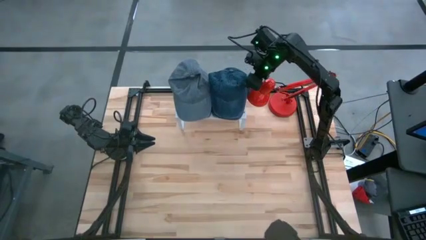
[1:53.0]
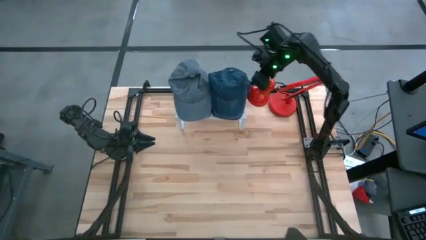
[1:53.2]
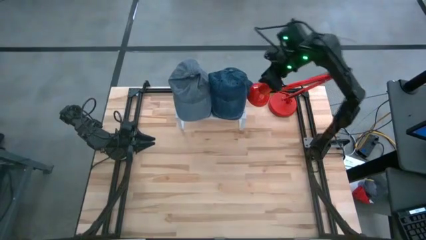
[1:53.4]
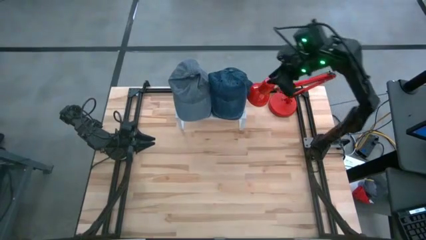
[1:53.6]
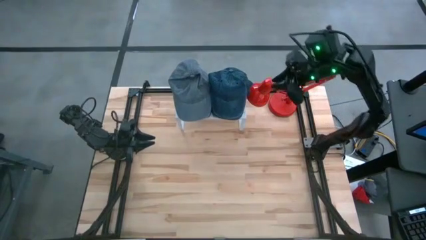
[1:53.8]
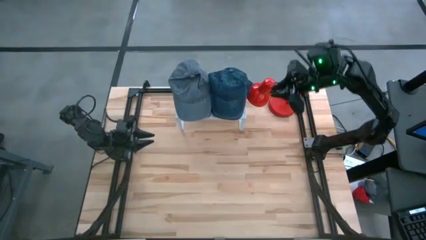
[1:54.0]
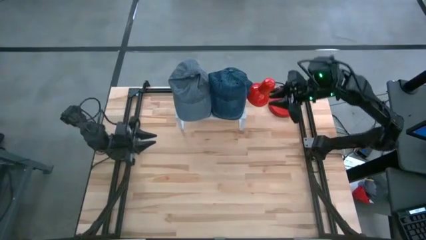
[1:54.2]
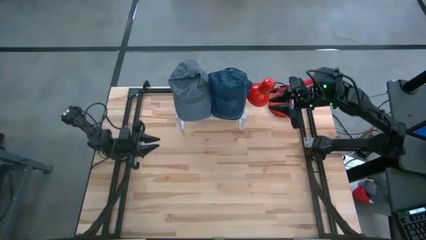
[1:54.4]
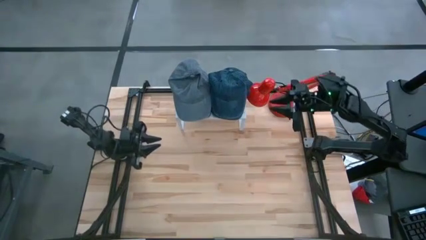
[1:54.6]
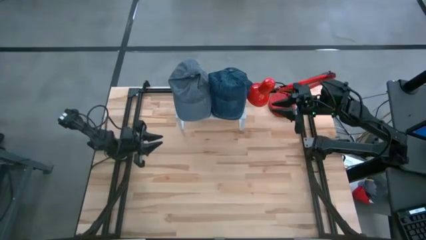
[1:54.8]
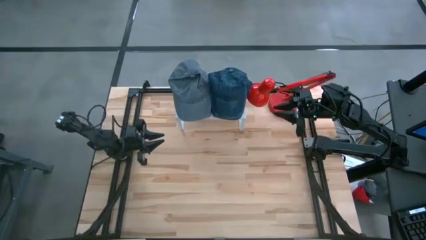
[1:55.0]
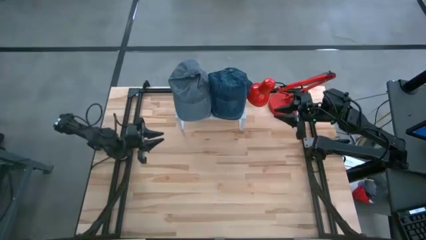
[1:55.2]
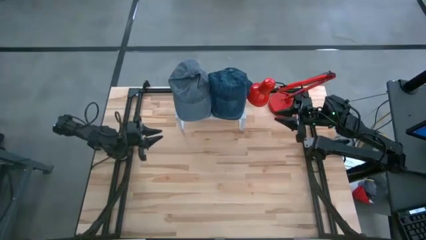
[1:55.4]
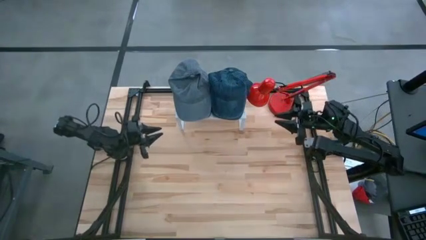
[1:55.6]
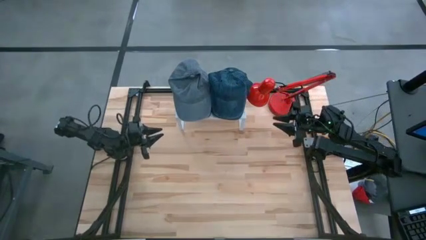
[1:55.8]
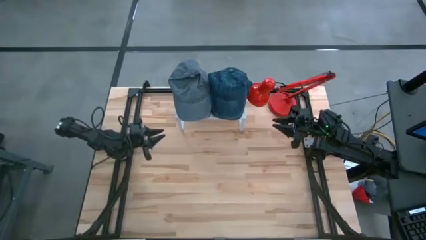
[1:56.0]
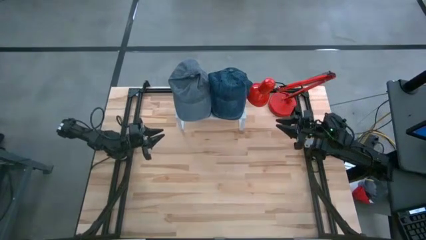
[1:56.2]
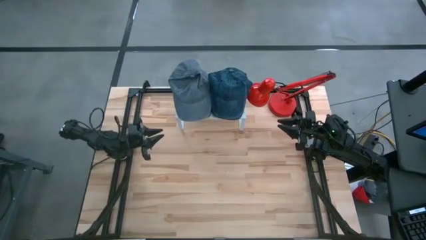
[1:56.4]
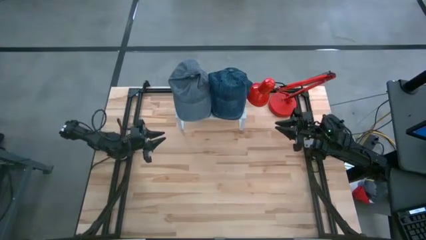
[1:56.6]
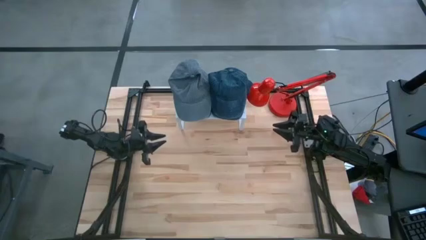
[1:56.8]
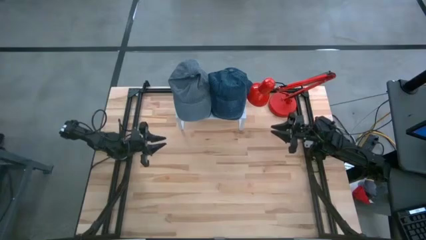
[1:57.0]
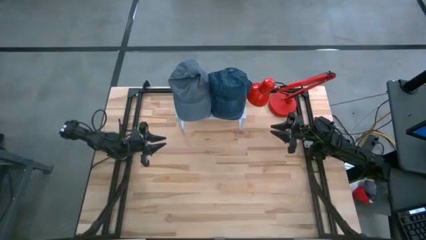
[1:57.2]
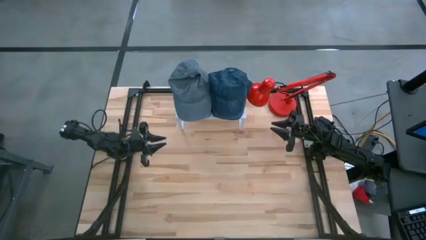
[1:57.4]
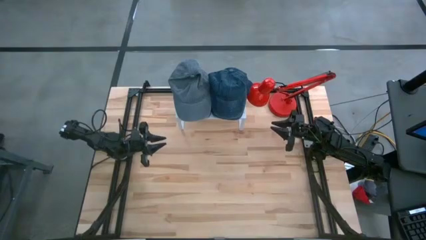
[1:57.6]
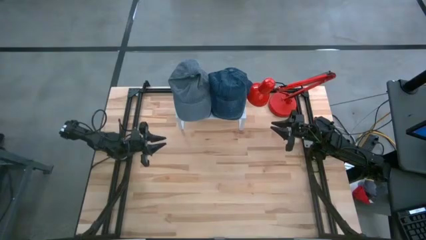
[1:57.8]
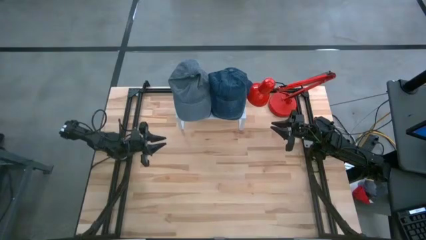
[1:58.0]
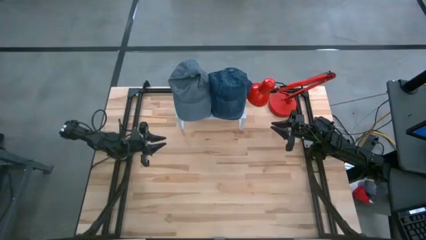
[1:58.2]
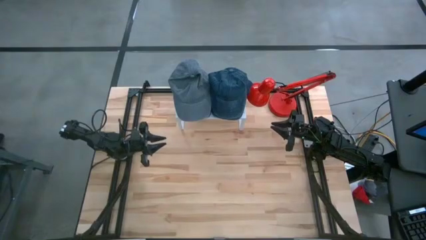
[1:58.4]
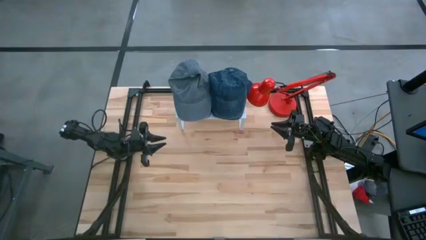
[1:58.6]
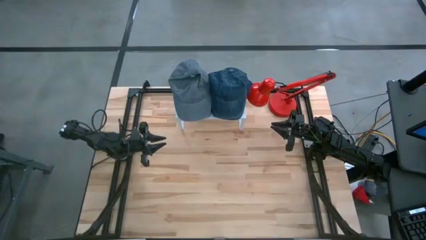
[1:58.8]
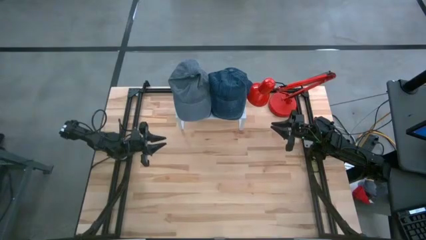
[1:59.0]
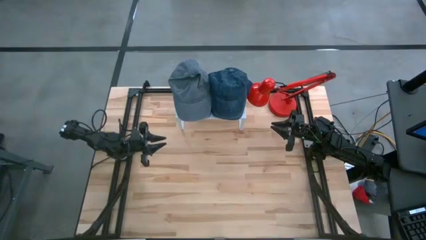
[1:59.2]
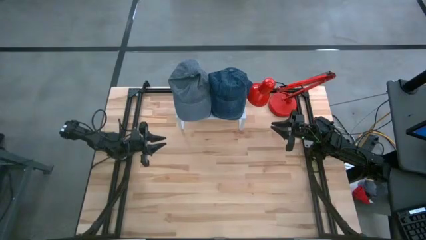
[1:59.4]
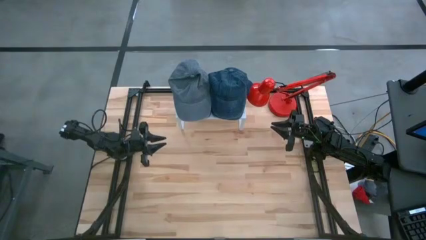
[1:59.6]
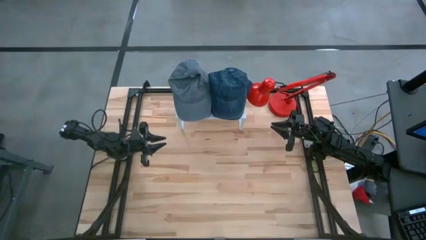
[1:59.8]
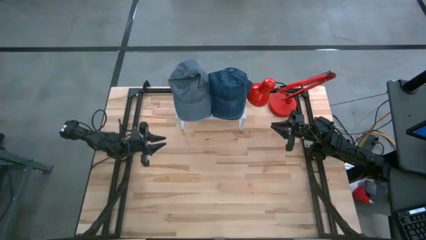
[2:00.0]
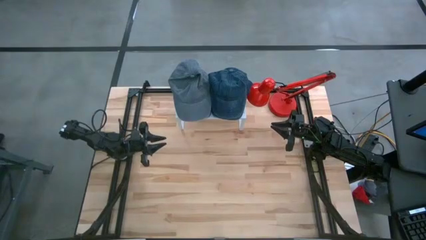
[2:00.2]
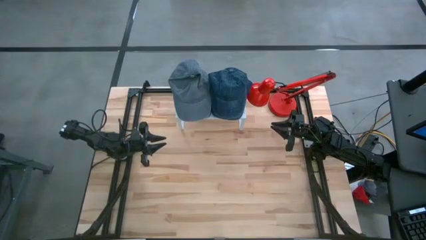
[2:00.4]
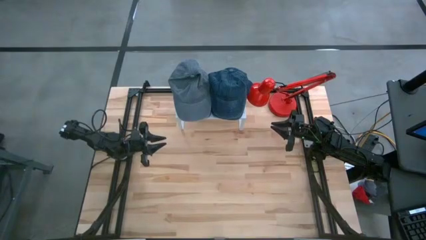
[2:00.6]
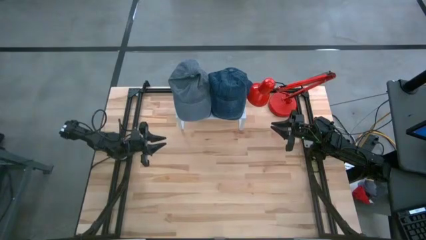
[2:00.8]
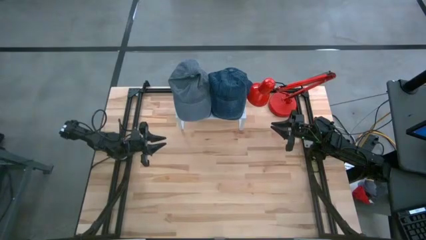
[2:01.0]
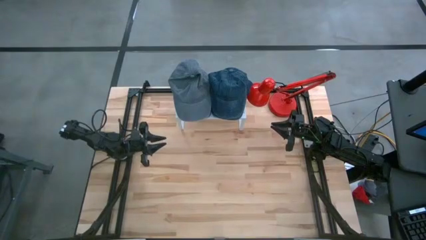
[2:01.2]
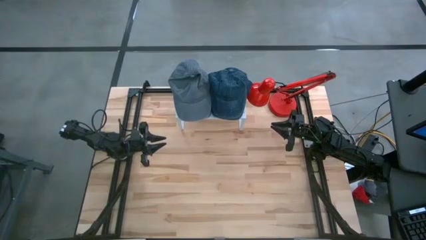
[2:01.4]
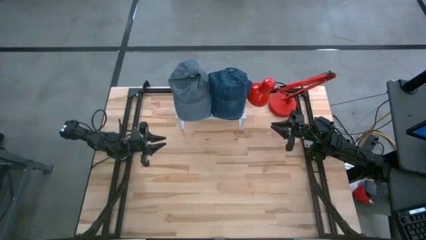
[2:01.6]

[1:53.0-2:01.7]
Task: Pick & Place hat
Return to Home Position

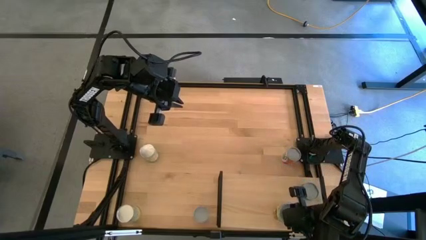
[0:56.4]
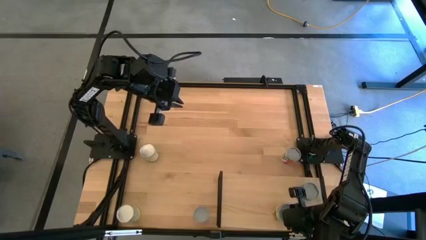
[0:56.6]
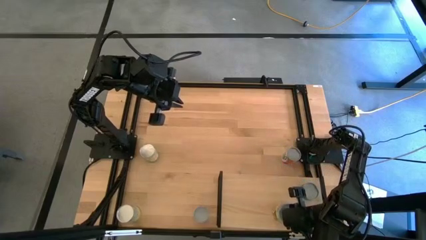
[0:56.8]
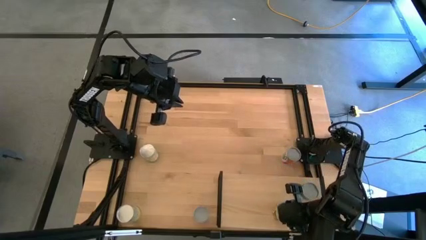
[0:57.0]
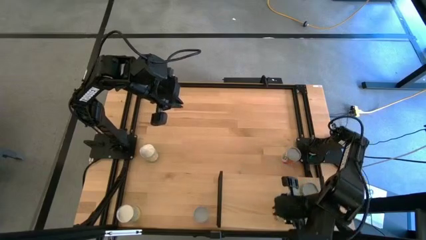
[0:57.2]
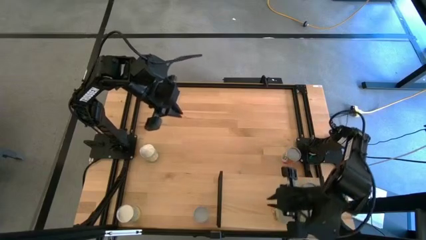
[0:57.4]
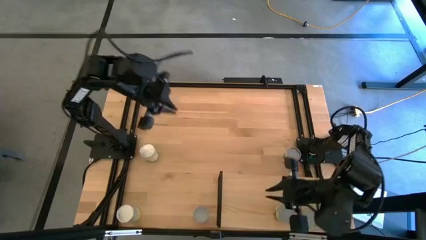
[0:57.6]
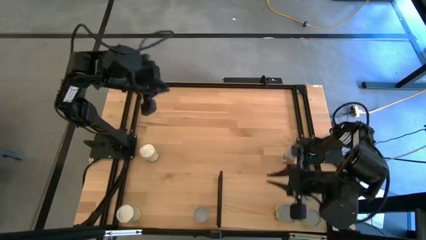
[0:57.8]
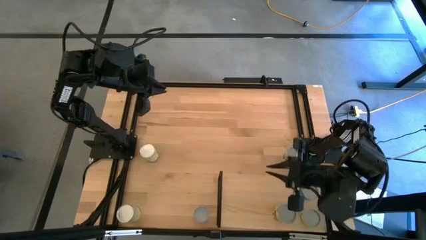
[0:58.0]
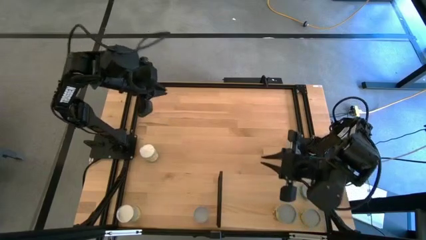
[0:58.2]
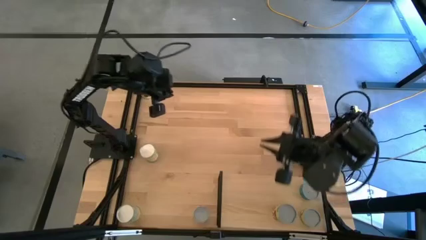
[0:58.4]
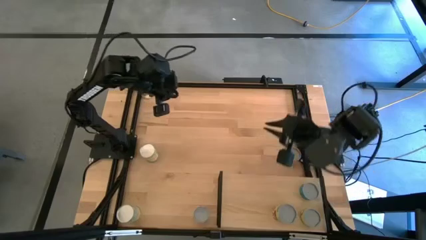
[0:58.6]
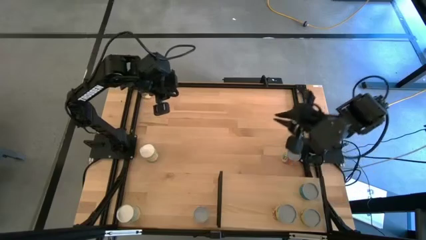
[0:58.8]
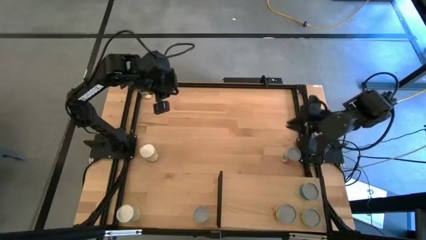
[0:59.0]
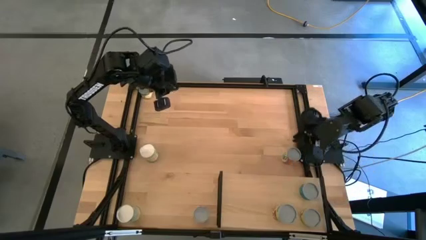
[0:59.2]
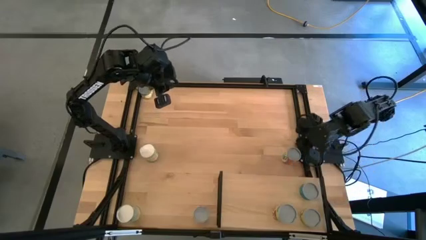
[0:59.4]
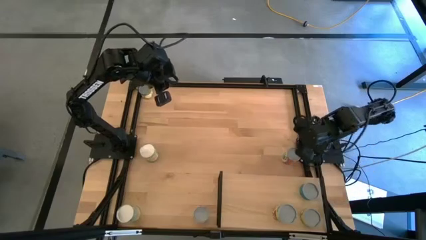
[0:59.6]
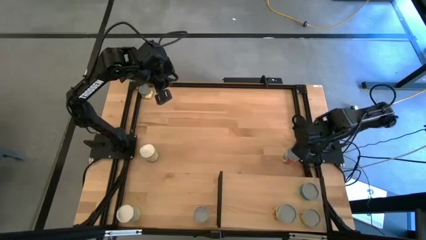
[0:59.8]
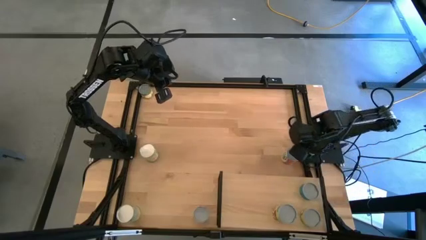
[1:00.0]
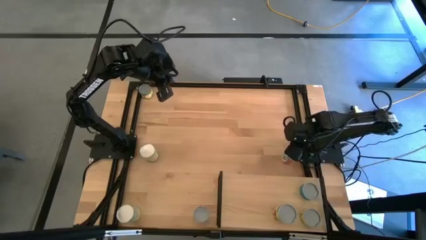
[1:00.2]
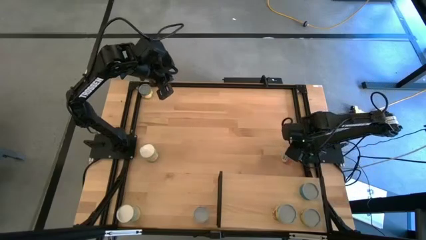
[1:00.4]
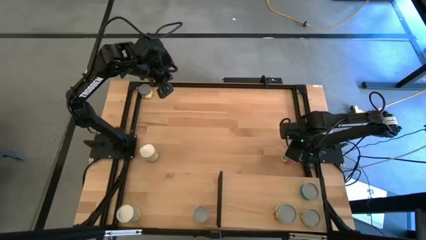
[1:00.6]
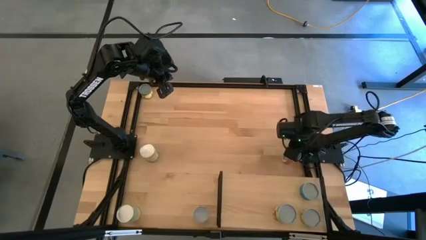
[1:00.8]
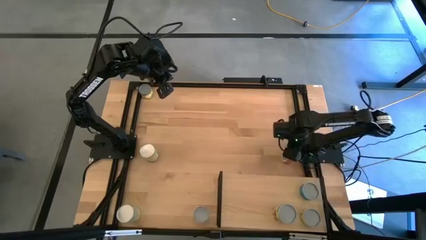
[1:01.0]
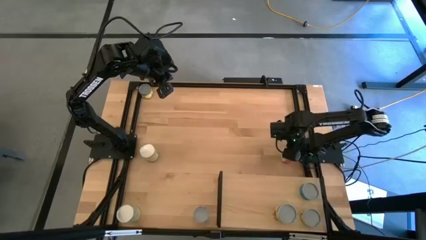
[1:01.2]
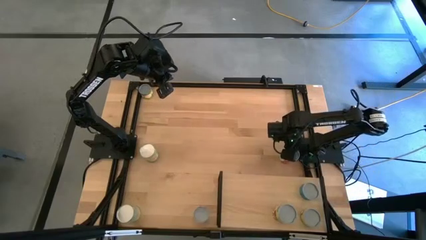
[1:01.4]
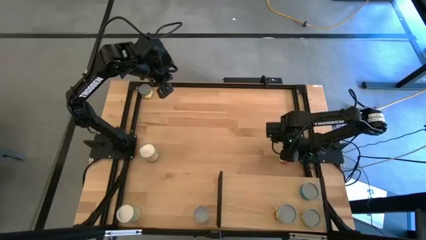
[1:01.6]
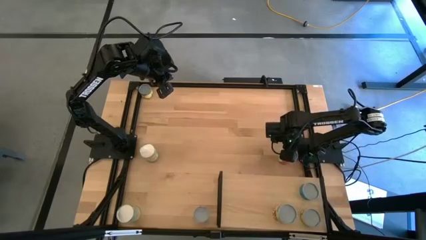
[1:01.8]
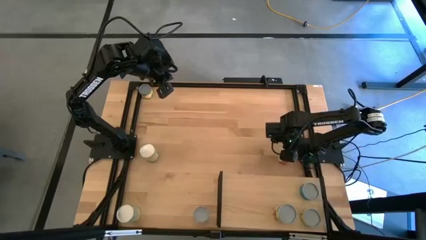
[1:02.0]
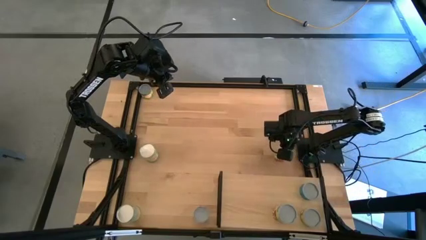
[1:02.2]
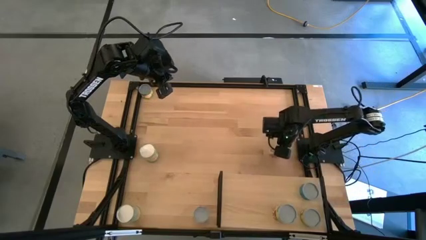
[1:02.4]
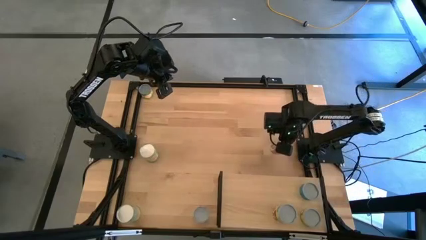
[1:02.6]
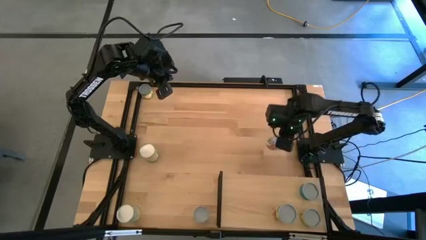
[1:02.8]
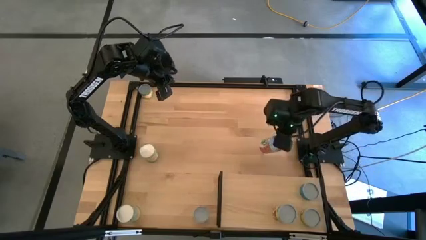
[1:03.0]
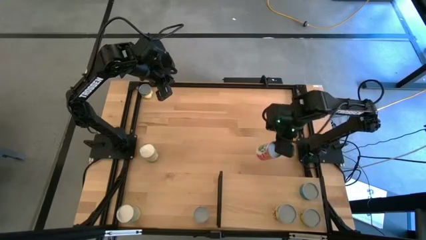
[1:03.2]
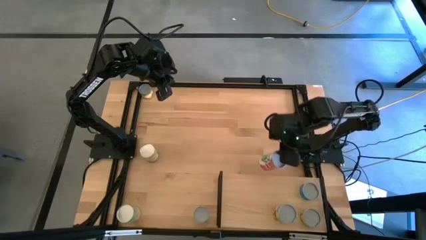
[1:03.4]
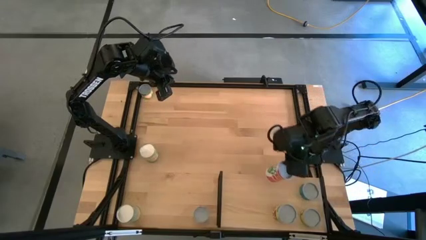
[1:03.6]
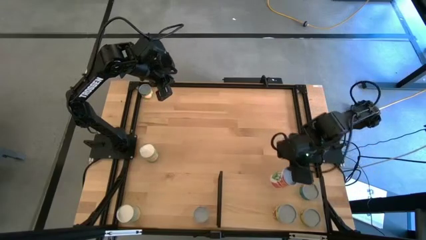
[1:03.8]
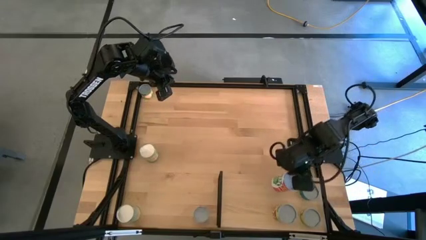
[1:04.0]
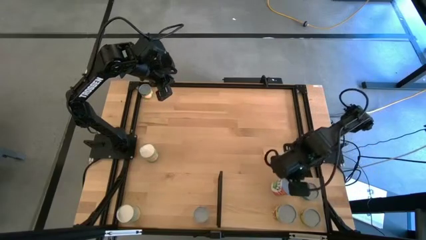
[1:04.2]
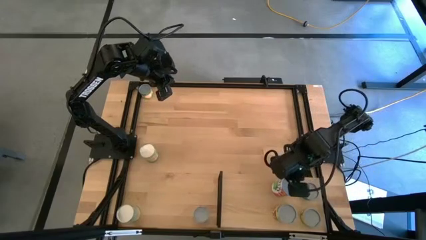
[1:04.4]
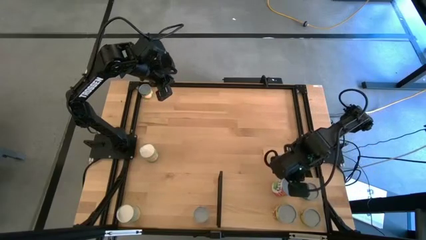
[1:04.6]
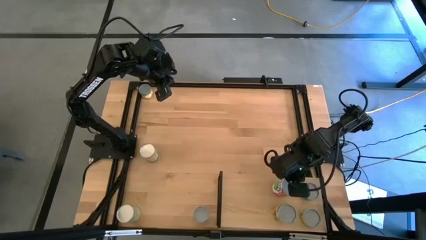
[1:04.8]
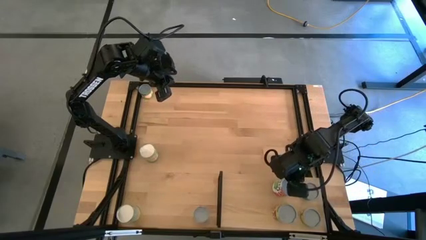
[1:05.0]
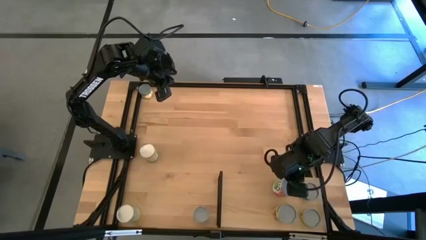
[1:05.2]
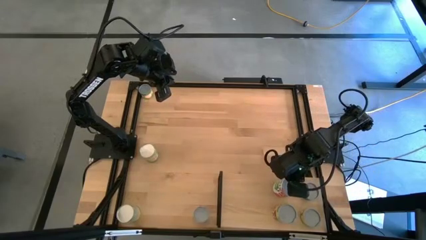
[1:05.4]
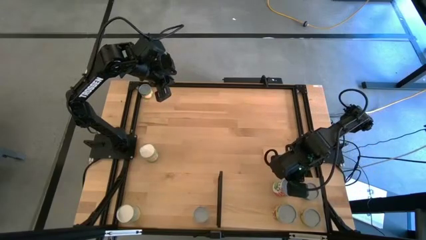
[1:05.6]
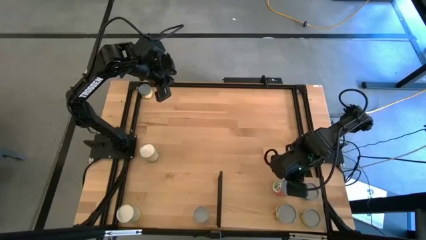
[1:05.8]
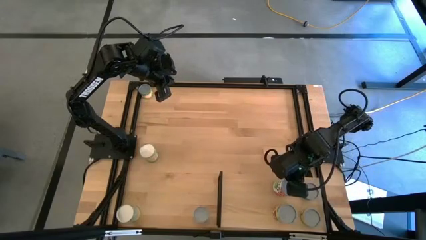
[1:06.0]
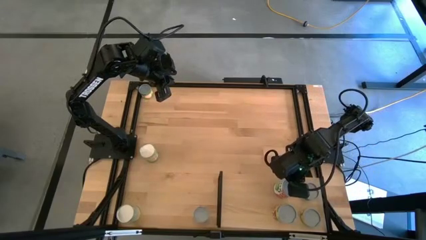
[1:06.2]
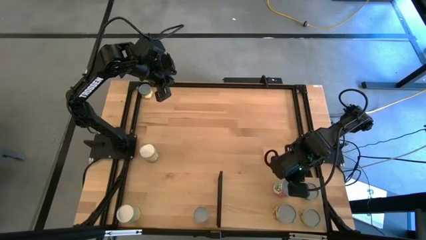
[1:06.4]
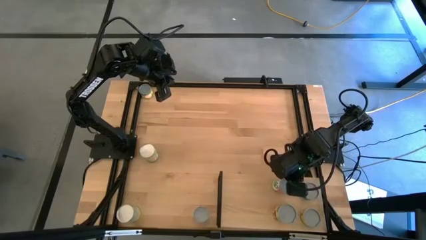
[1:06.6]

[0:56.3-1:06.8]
Task: Pick and place cans onto a shelf
Put the canned mixed fruits on the shelf
